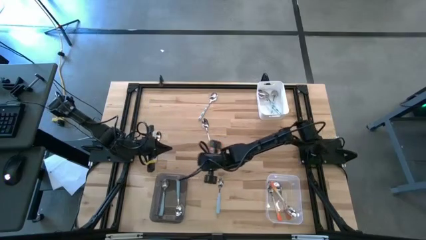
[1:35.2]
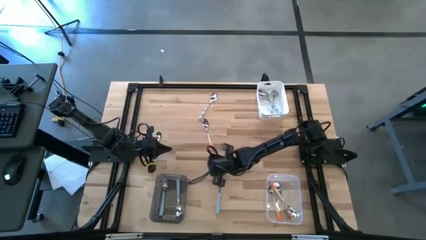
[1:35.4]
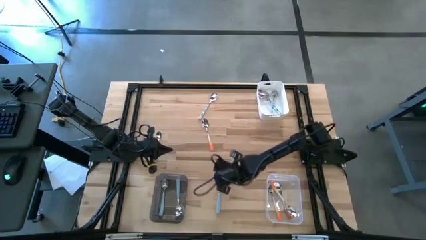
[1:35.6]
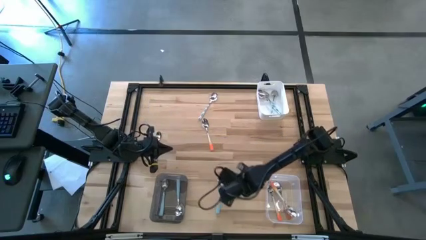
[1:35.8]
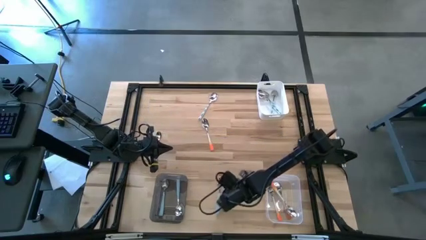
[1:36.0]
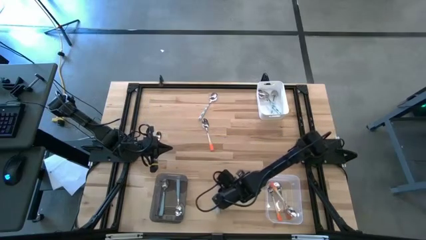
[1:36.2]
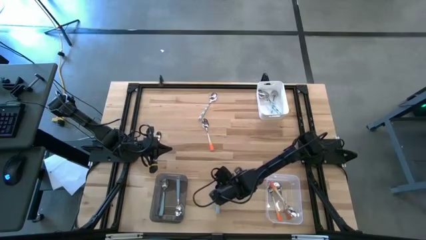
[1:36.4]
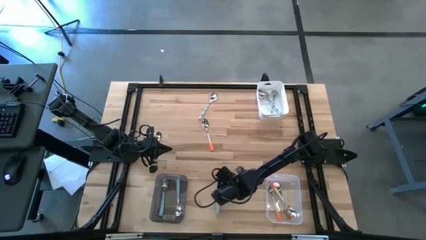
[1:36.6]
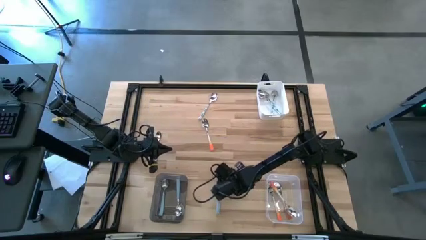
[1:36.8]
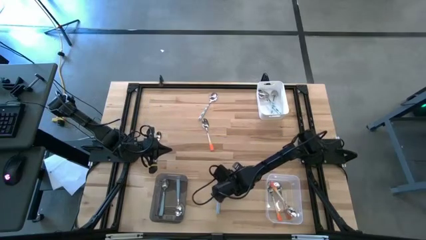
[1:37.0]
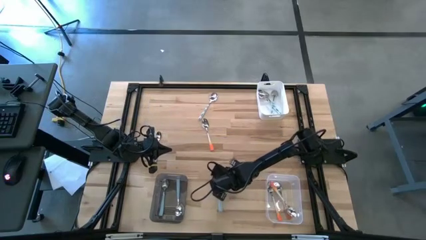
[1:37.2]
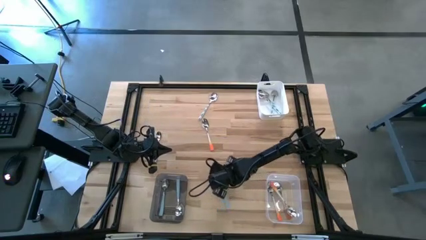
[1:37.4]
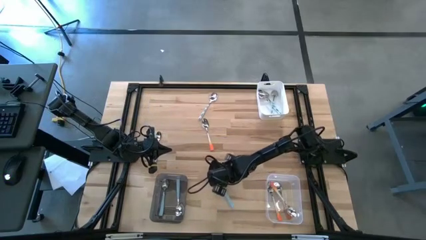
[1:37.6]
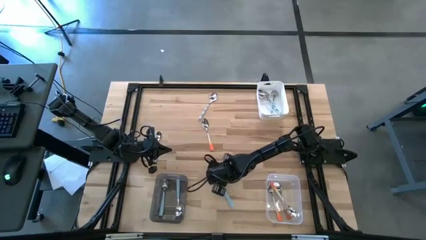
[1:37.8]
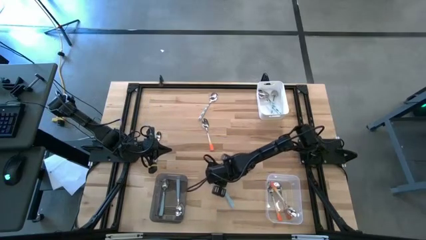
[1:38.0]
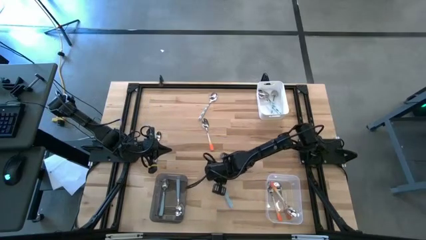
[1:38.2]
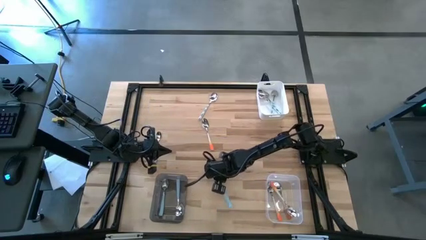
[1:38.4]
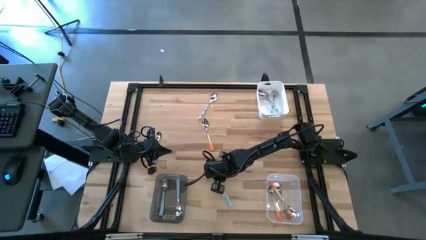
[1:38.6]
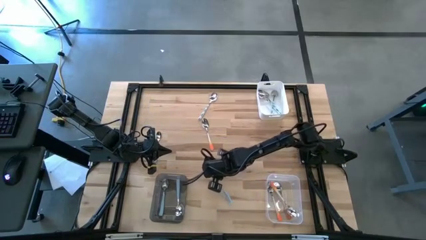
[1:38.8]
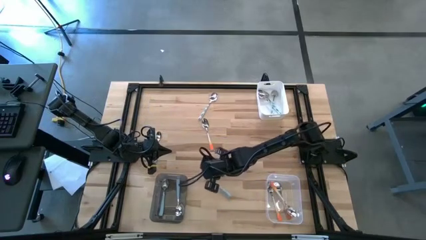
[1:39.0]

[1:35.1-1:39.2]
Task: Sort silverware by color (type)
Put the bottom light blue spoon into the transparent bin

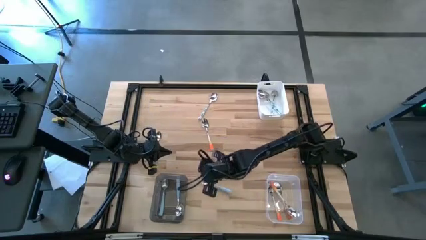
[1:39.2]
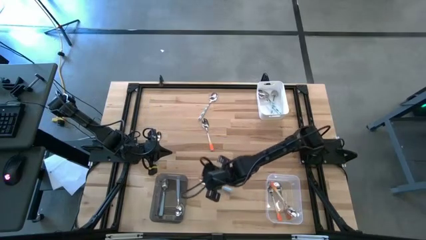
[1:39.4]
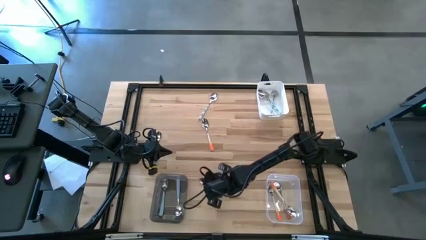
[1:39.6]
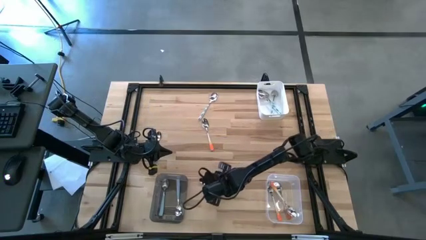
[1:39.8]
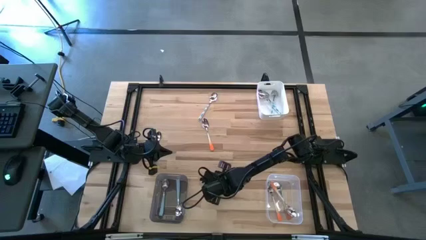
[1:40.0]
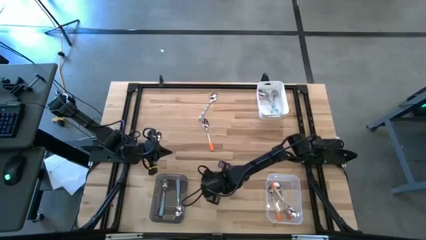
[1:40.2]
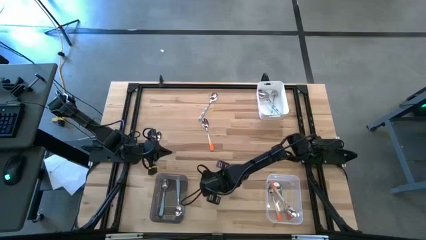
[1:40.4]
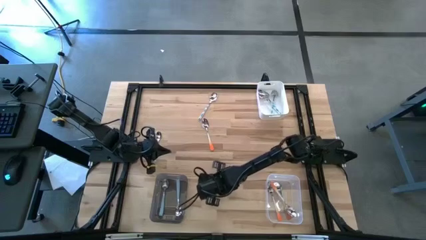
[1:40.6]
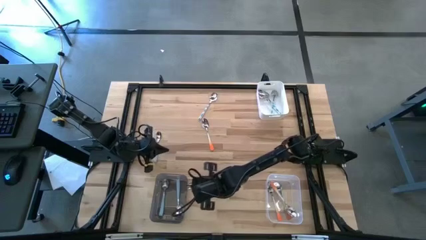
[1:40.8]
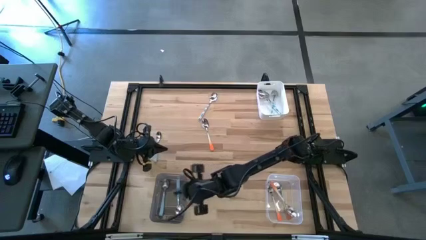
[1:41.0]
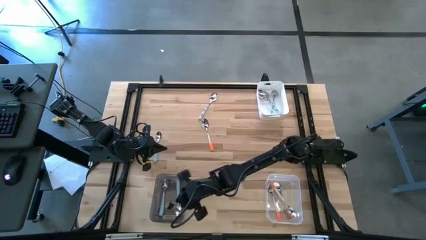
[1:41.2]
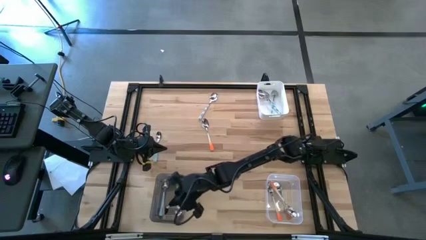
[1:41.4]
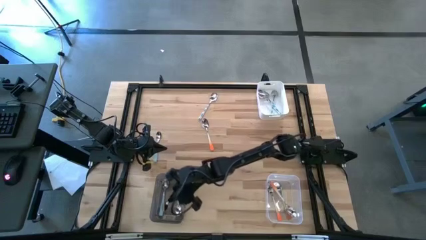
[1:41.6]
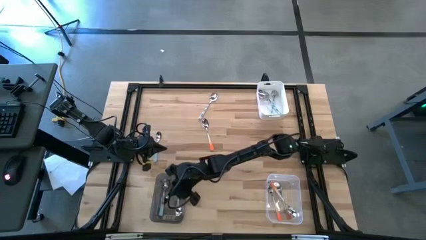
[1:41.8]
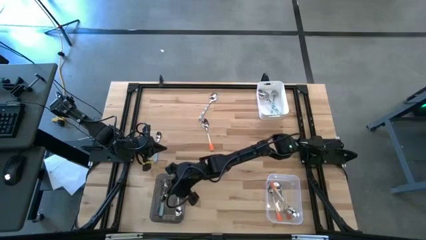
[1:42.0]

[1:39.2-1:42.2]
Put the bottom light blue spoon into the black bin

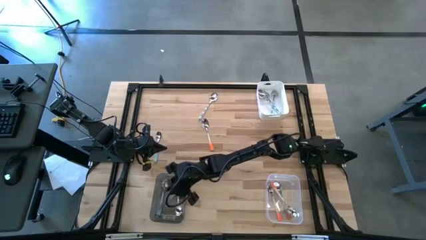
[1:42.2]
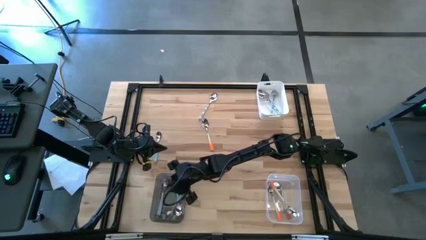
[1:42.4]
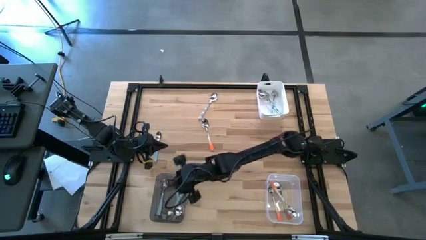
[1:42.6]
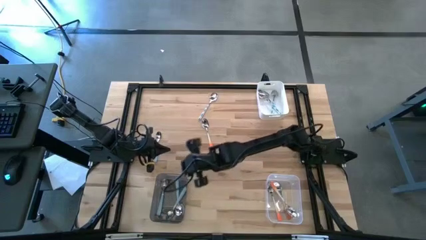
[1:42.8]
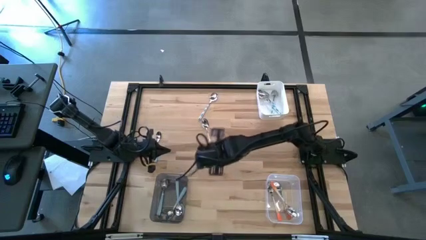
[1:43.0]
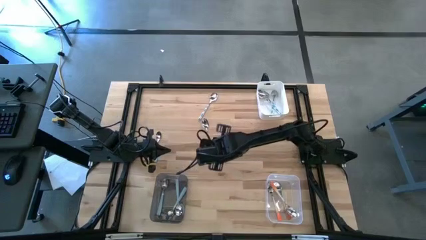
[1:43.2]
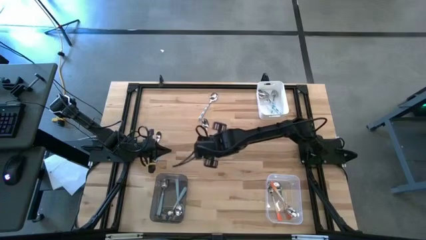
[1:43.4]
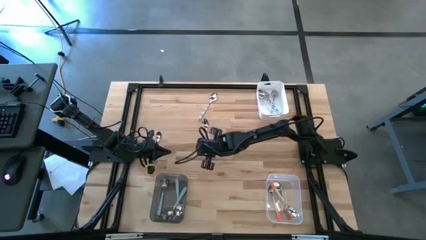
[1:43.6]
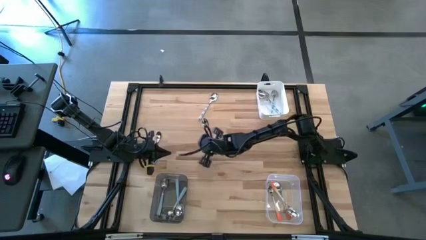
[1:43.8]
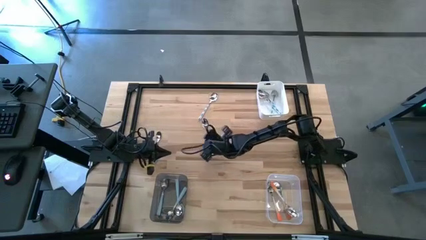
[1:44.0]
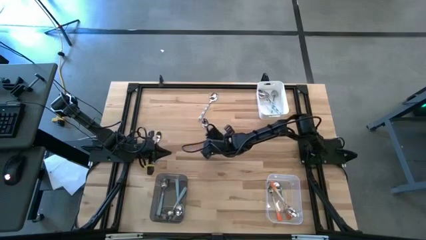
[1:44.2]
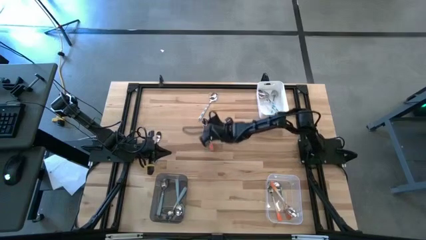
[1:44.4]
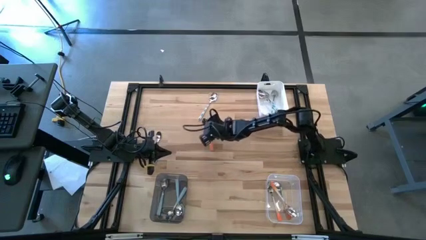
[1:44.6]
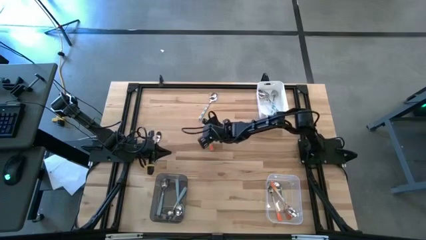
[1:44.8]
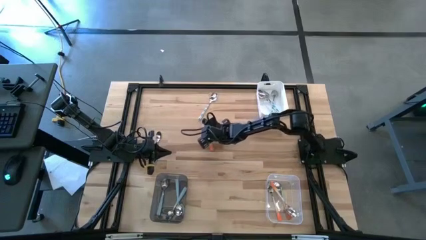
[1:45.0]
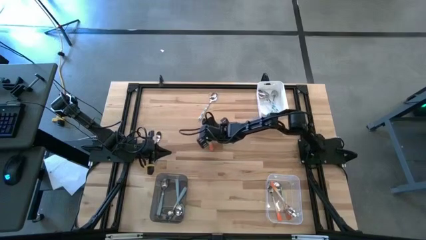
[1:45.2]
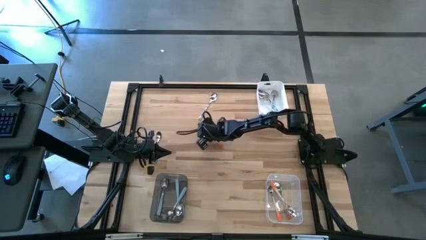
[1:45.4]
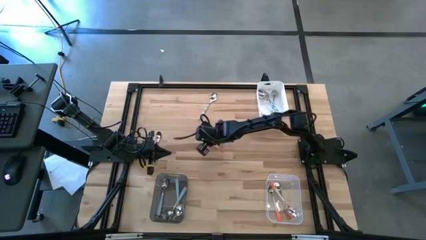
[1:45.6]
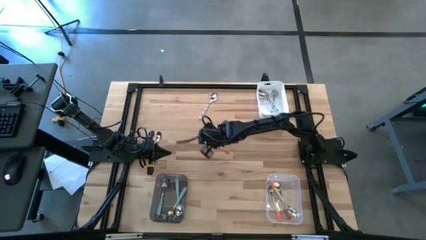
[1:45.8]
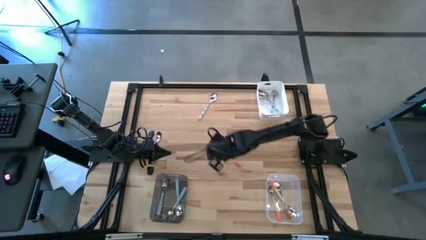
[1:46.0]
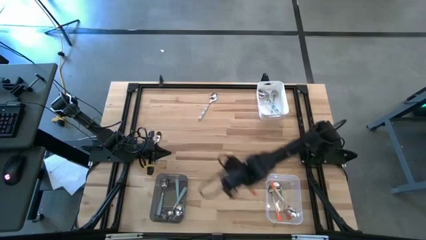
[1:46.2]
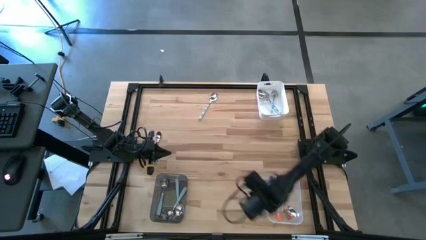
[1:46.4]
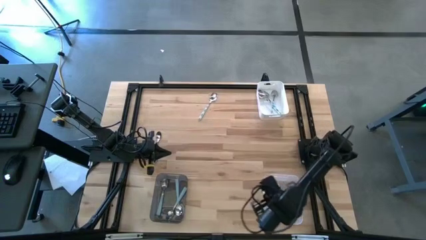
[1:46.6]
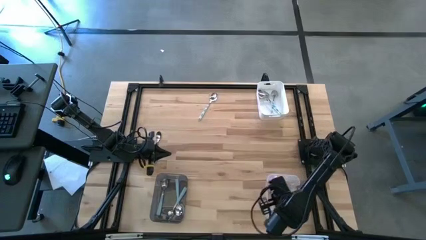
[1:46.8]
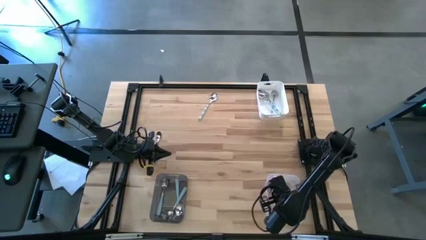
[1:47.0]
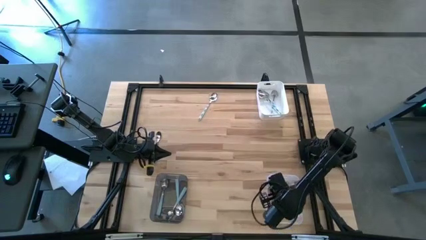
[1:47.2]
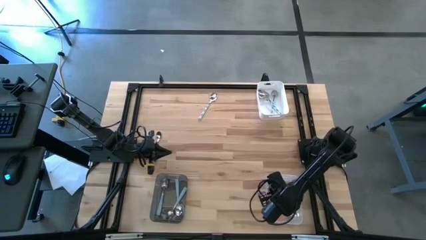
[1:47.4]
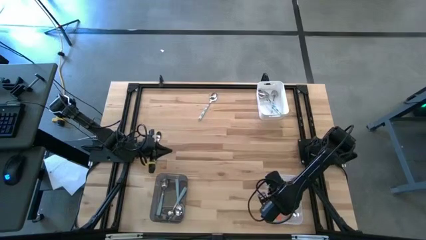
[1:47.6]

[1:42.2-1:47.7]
Put the bottom orange spoon into the transparent bin
